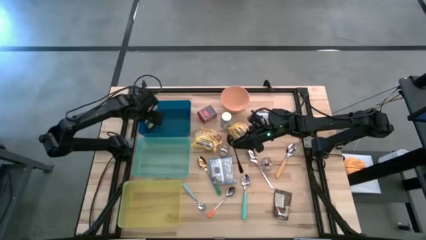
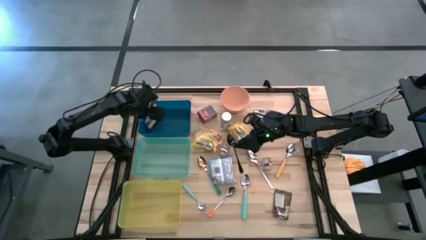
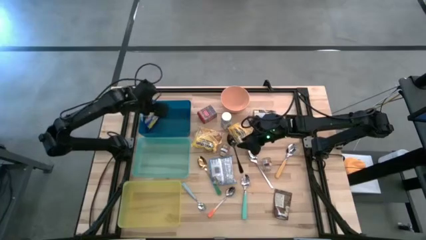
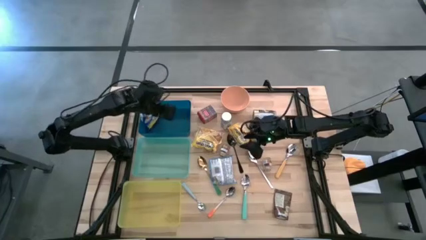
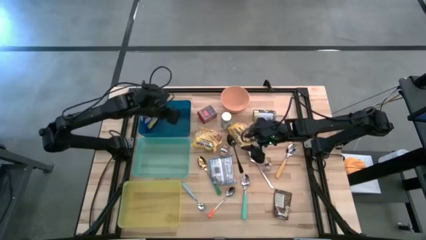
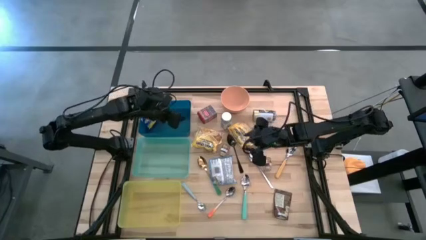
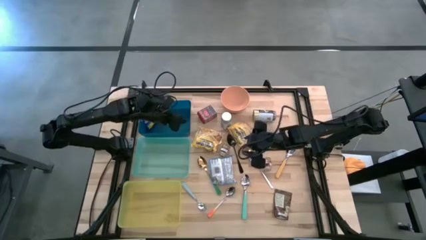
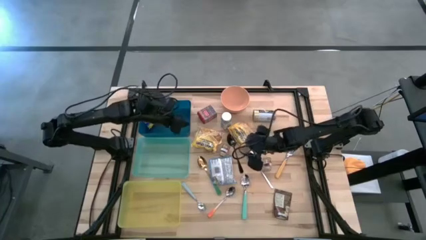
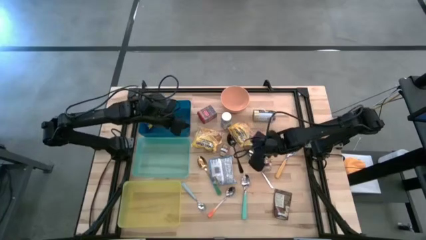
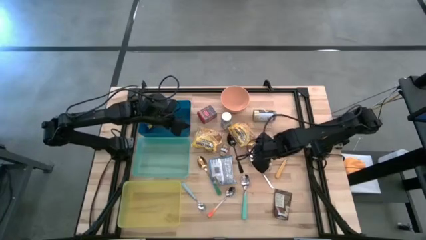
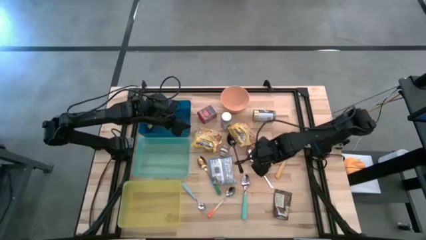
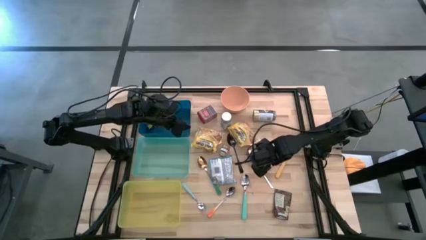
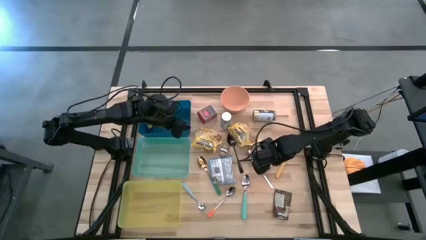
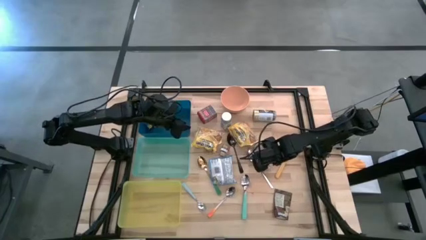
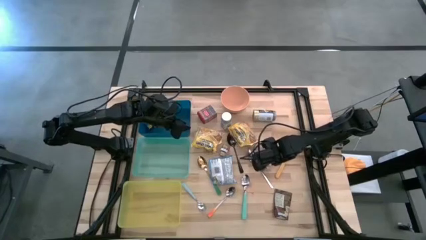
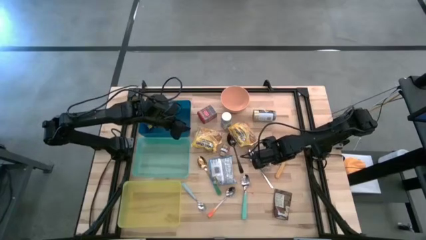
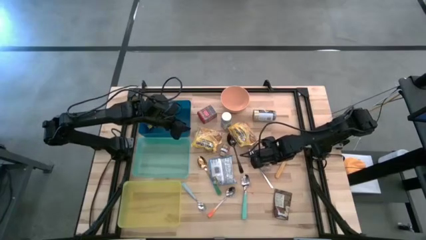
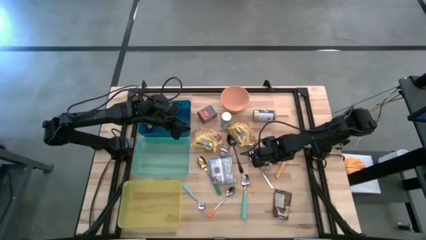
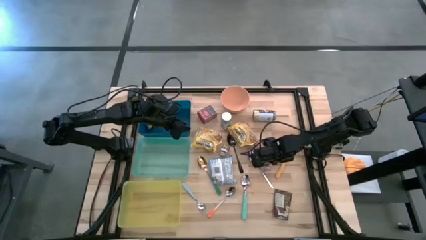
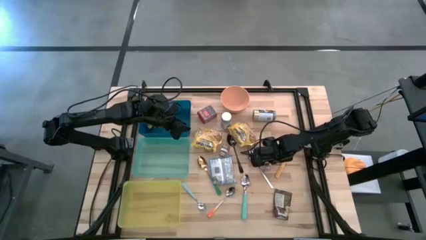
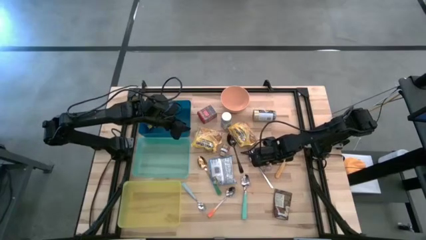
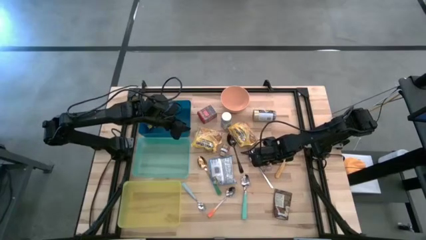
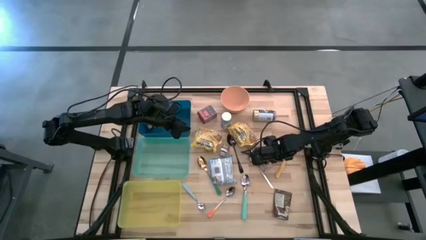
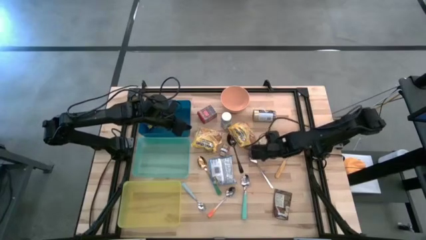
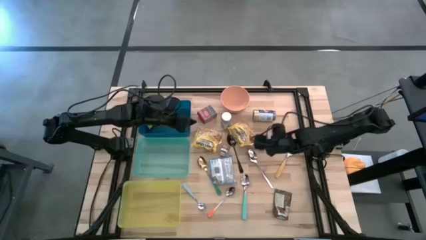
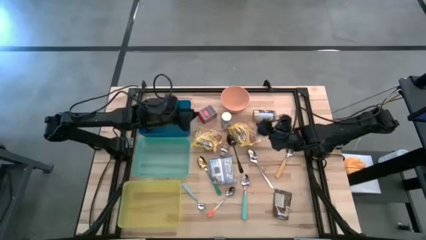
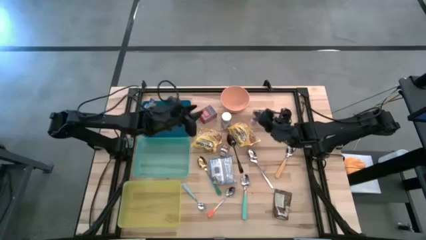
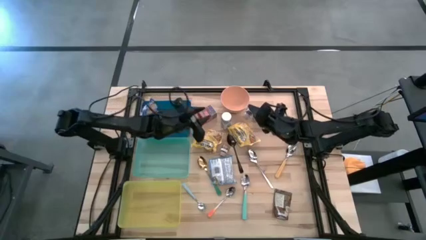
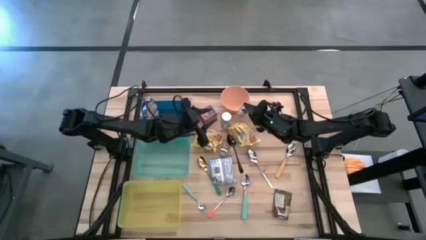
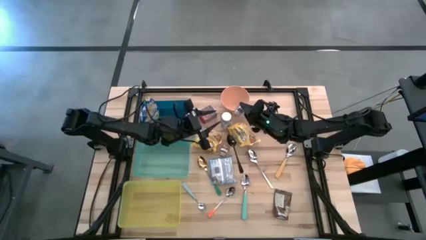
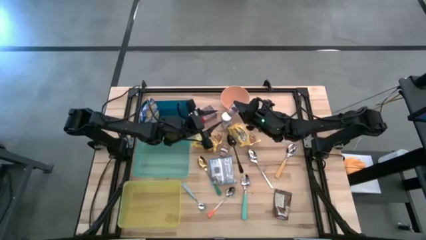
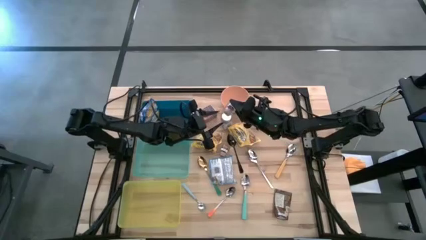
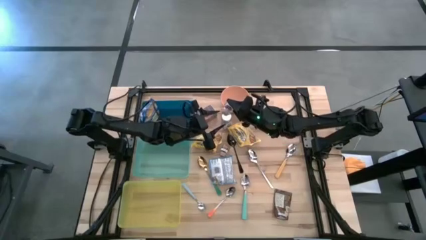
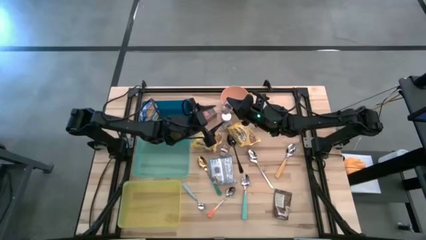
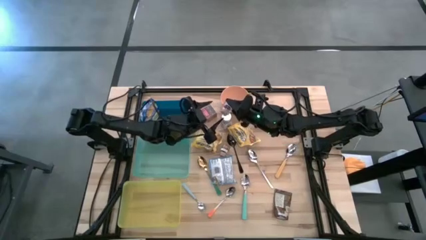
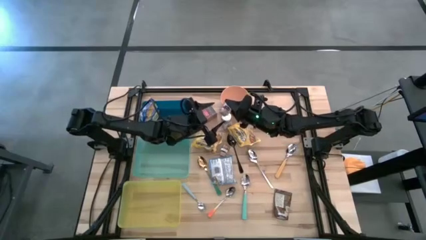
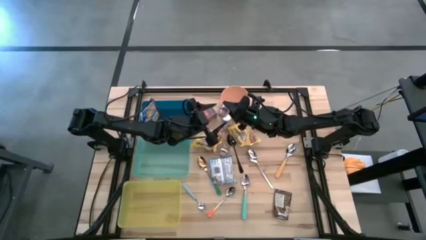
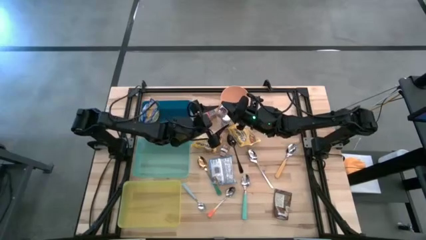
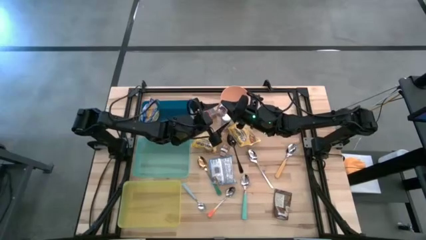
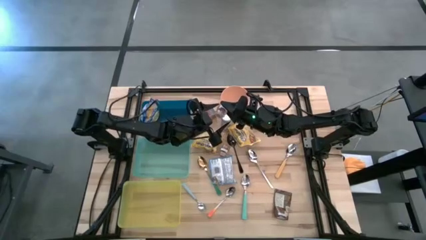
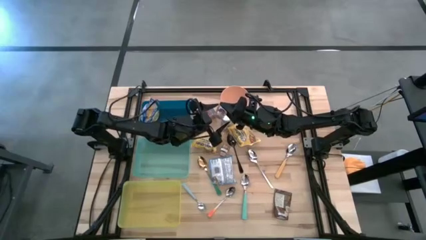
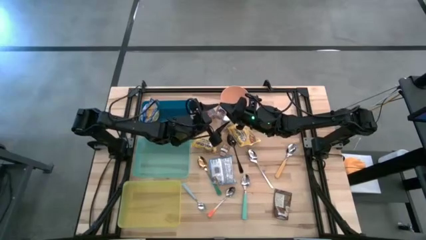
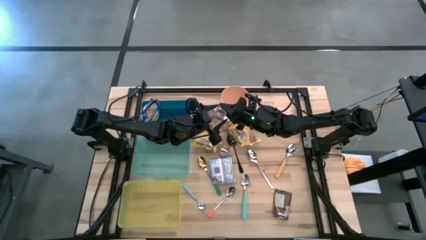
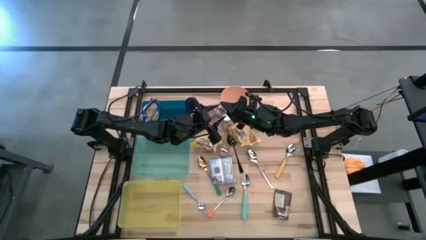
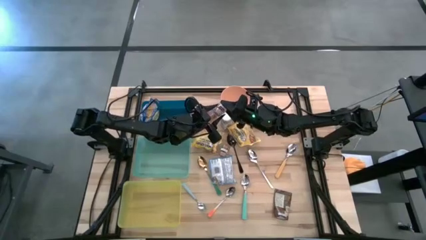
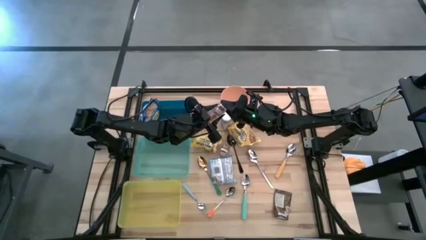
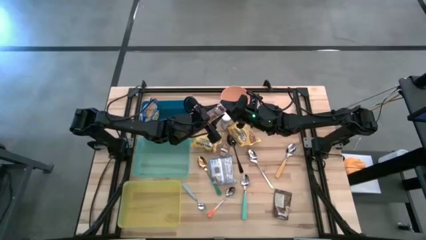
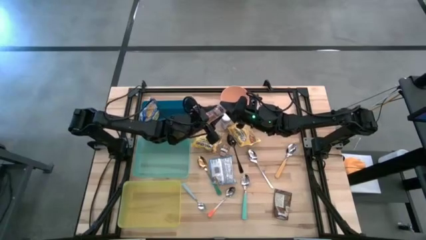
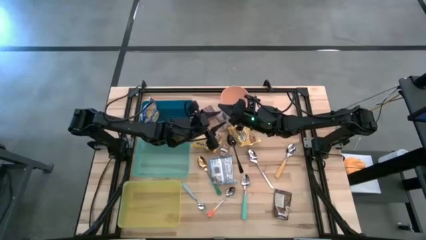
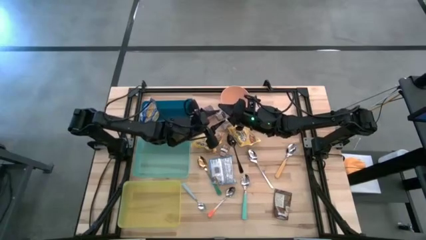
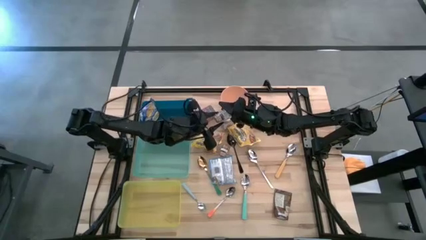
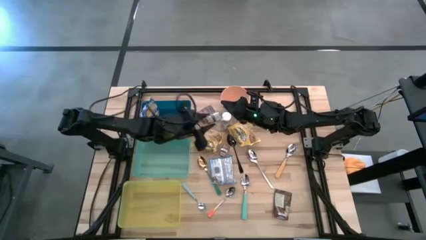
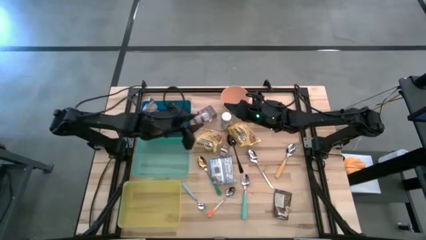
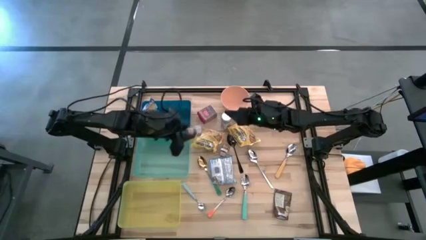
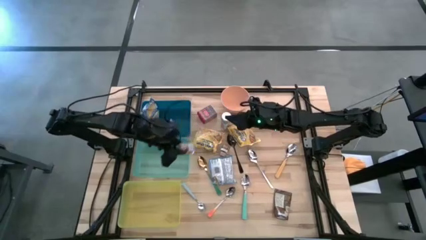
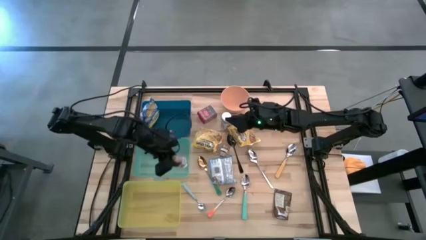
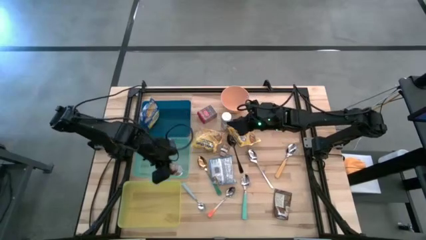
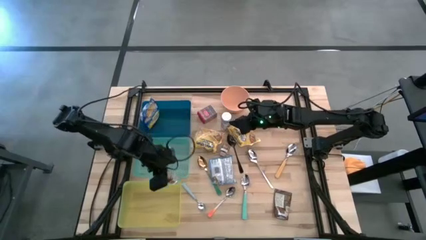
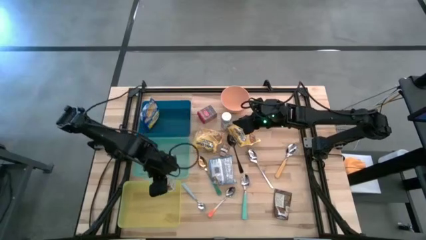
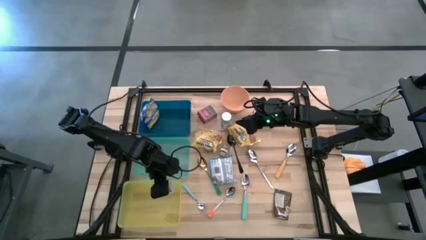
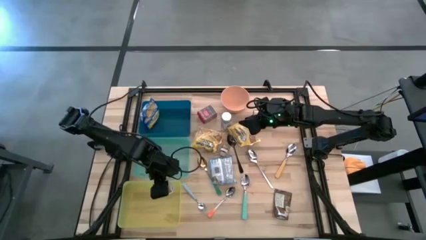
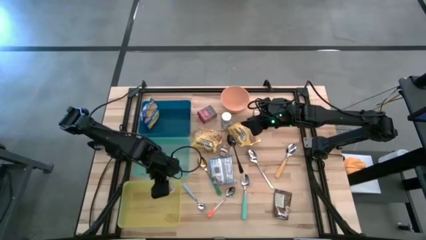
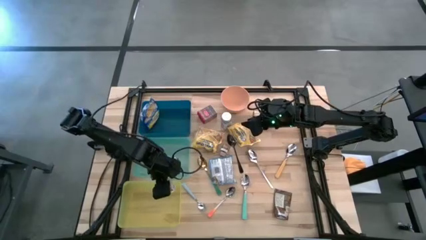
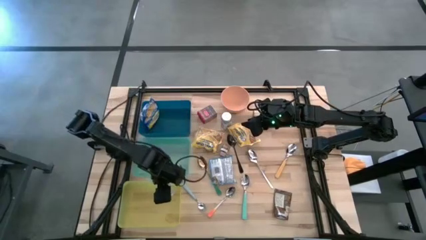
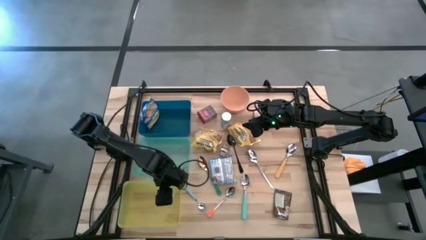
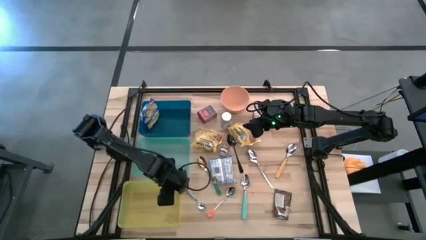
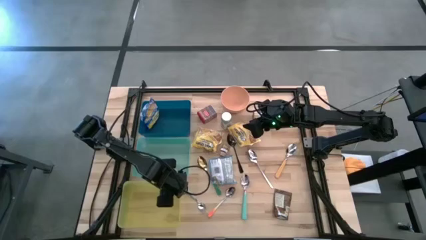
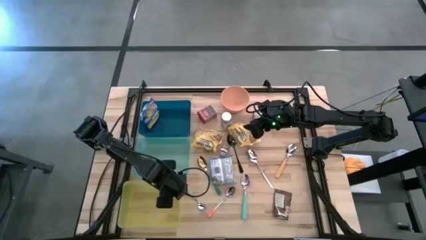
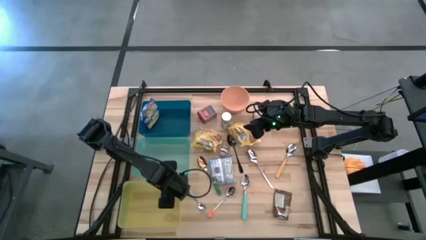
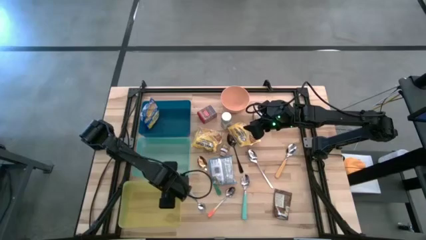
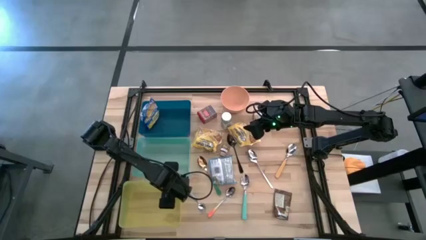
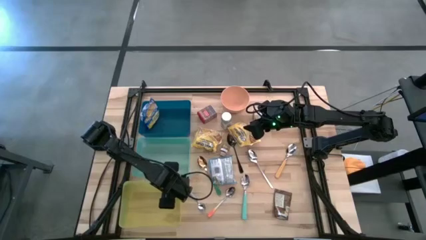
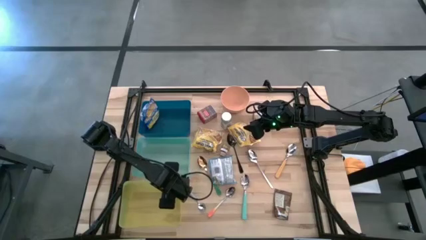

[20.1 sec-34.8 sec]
Put the right seasoning bottle into the yellow bin
